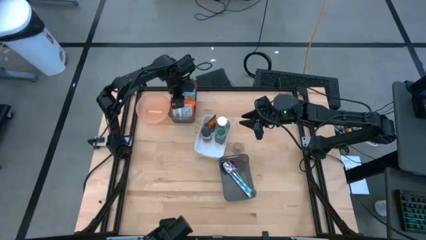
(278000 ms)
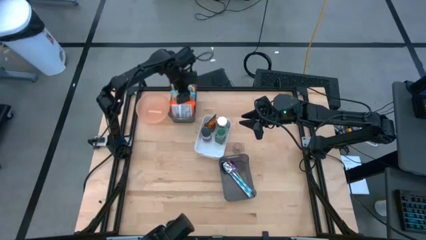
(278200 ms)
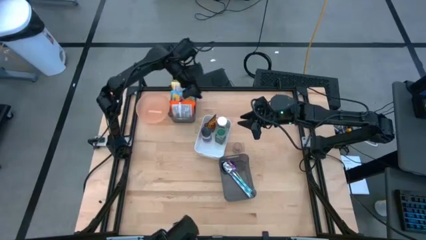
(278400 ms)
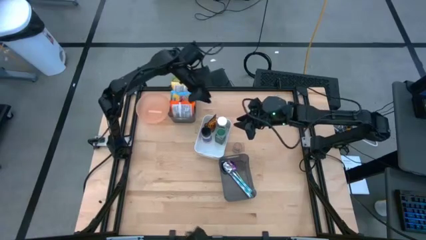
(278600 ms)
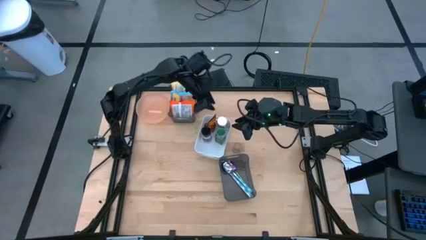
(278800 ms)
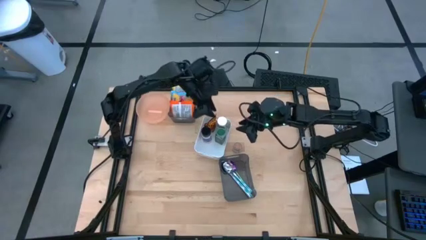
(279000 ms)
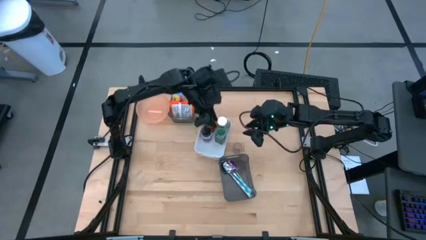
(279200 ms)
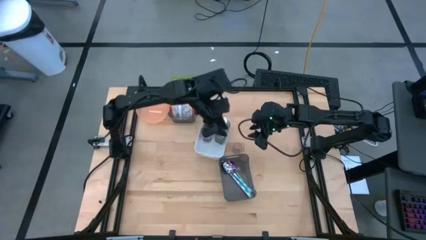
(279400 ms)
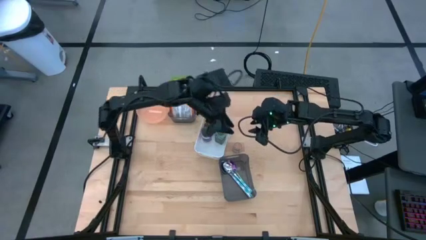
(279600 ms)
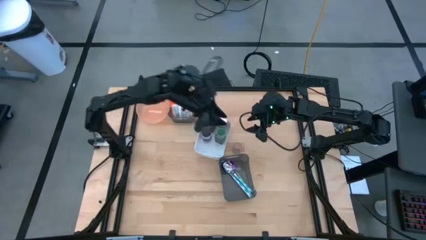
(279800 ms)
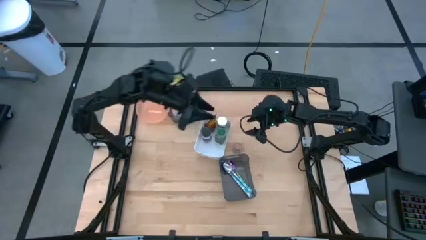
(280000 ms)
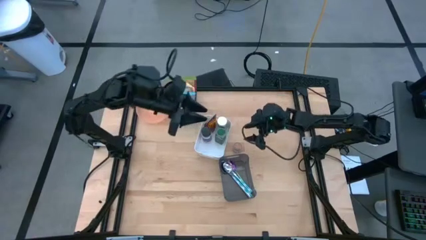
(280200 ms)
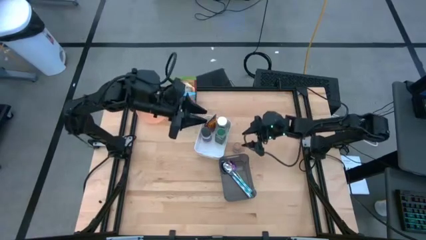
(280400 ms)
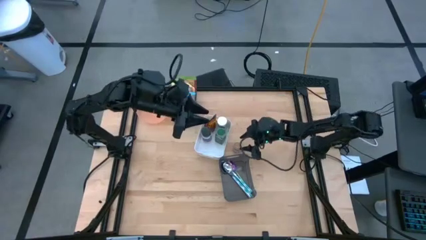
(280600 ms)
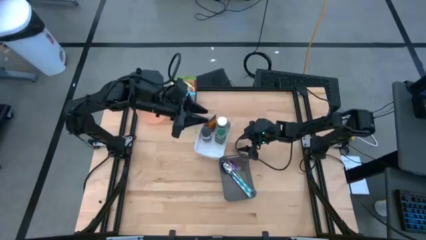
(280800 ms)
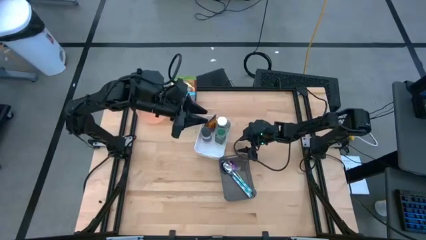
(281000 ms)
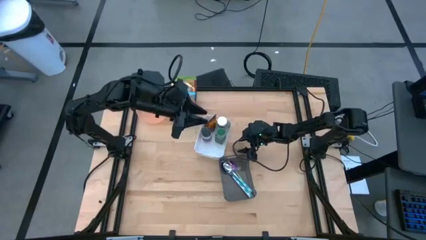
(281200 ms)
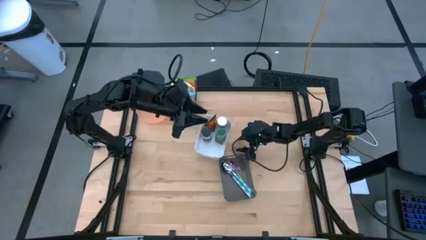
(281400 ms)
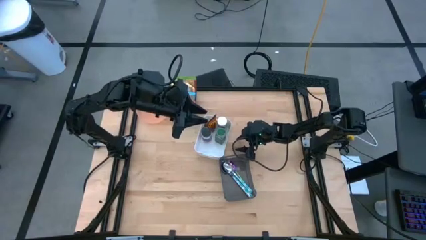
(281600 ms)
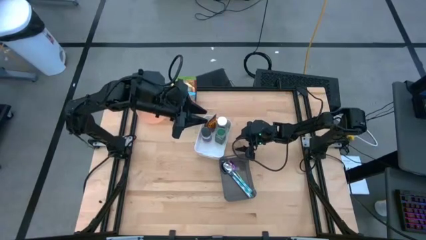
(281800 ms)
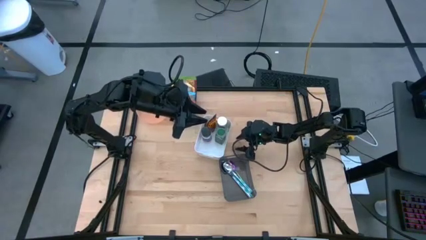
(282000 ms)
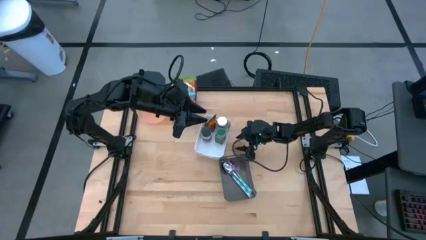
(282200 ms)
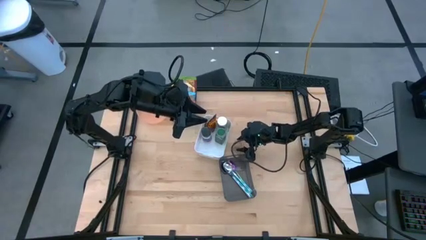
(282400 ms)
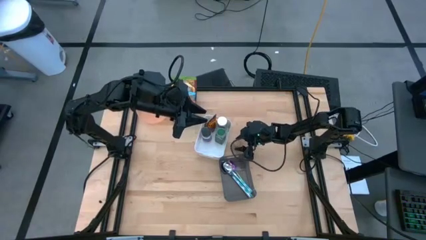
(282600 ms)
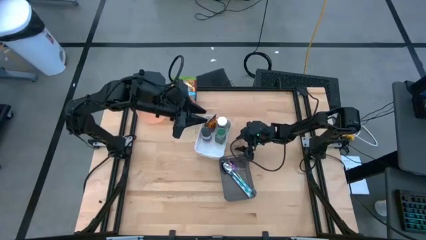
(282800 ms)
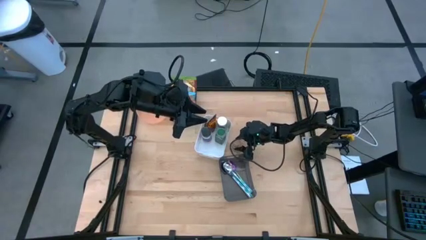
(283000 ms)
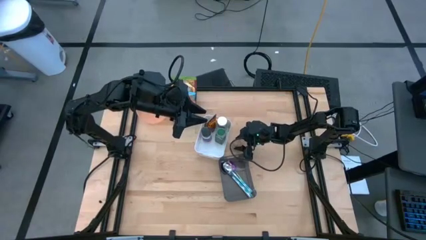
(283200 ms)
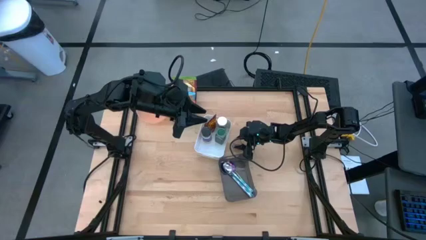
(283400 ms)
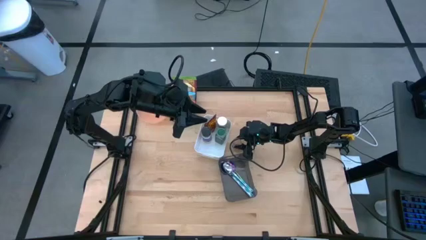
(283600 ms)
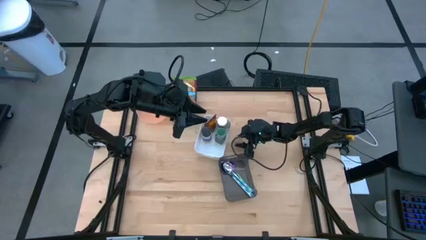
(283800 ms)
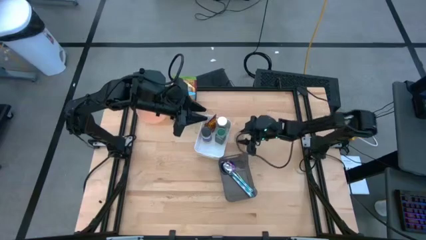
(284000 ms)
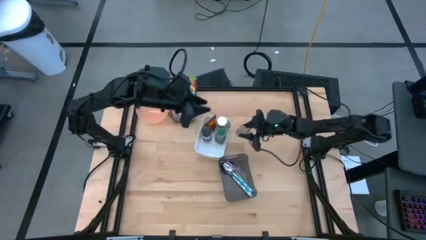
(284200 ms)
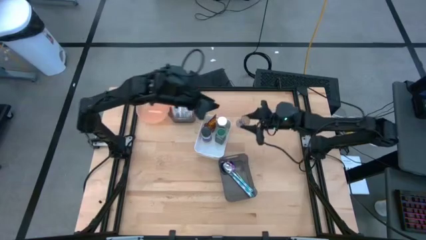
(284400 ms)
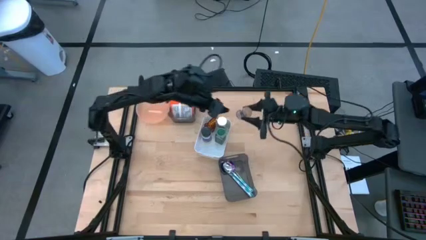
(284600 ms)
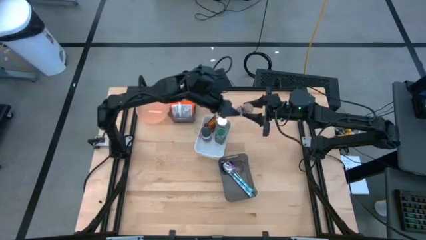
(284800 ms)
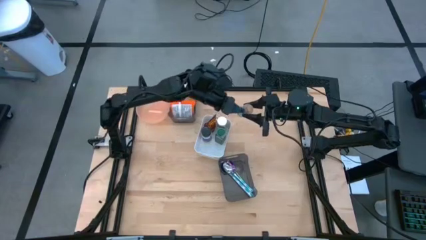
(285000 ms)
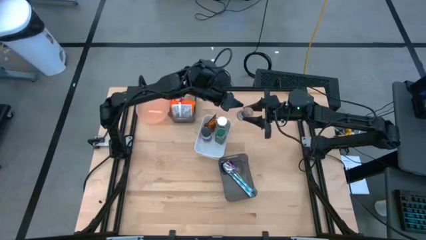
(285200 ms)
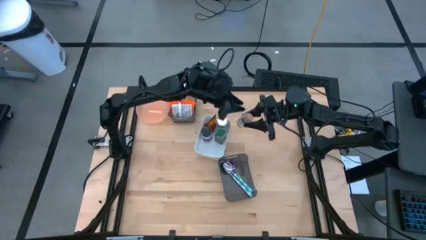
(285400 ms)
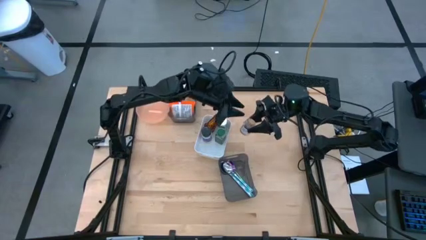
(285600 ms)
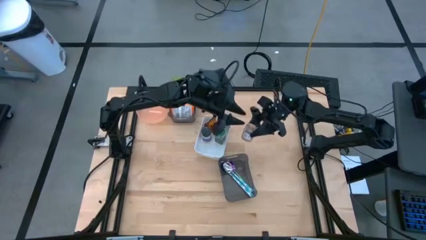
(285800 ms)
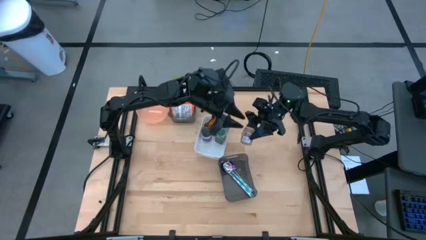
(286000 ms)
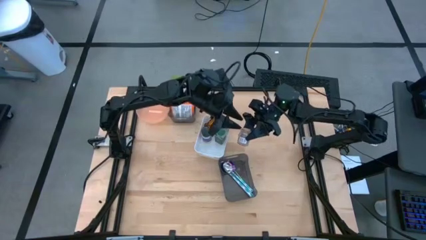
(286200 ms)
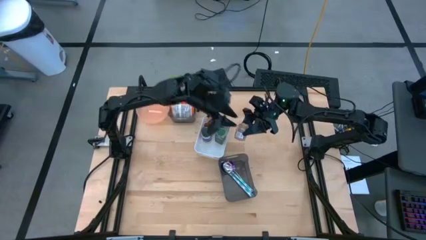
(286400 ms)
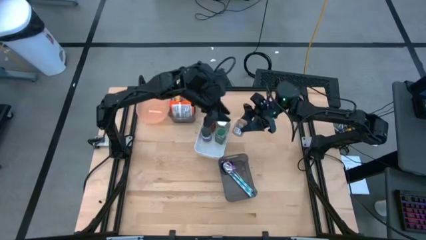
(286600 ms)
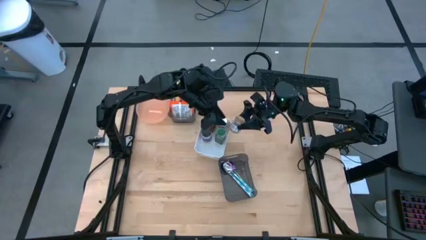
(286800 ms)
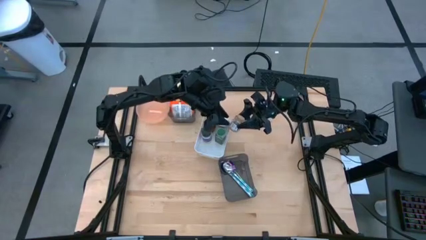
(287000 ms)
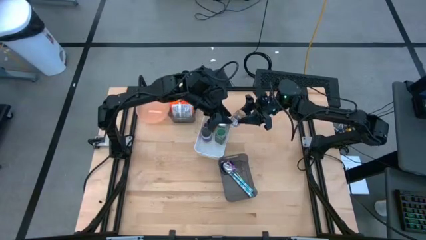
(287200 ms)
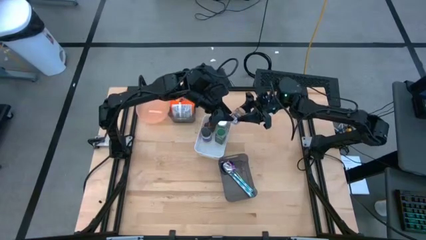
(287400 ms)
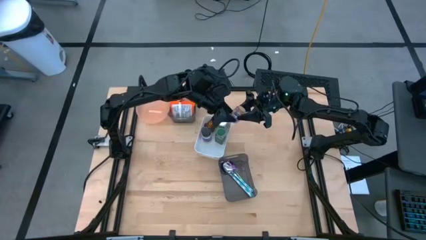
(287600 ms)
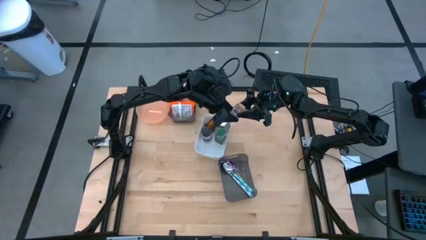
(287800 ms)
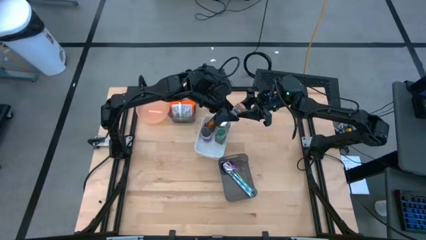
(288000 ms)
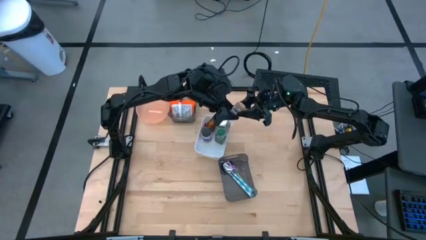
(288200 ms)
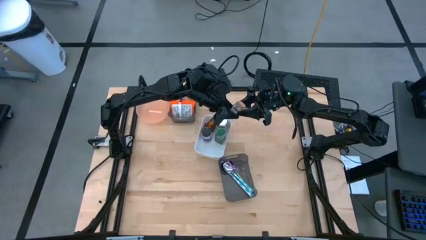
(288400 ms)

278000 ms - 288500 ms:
Task: Pick & Place Food Item
Put the brown seasoning bottle into the white bin

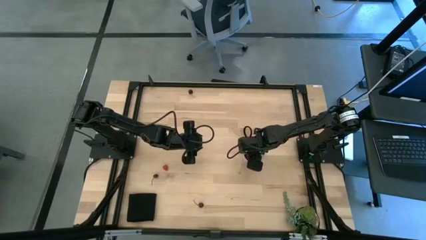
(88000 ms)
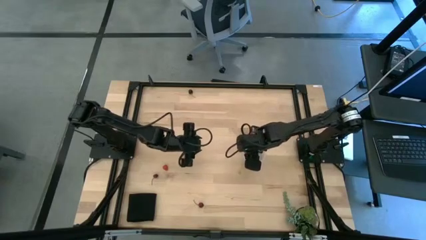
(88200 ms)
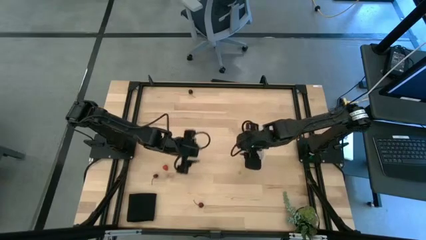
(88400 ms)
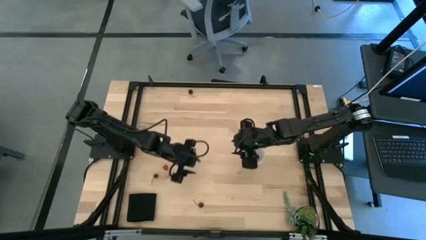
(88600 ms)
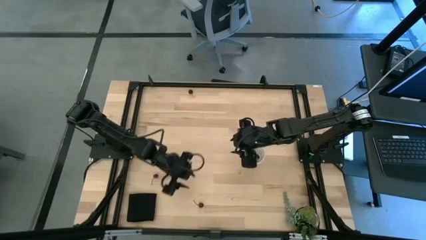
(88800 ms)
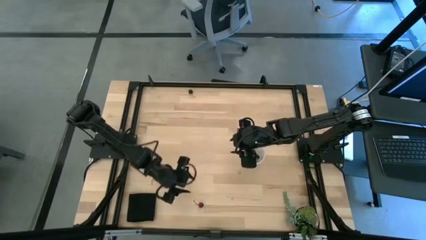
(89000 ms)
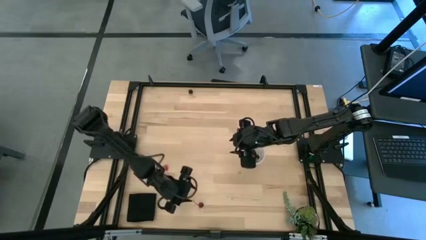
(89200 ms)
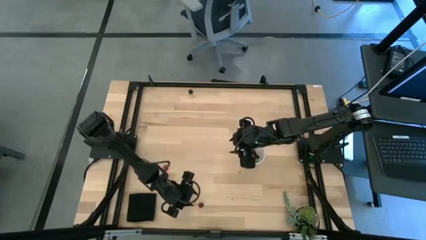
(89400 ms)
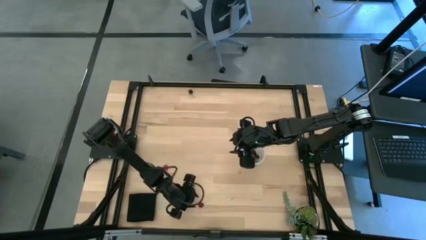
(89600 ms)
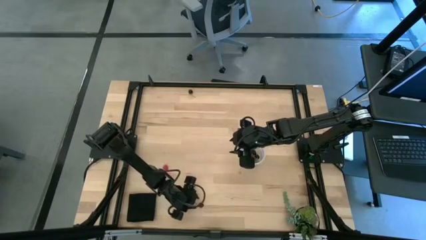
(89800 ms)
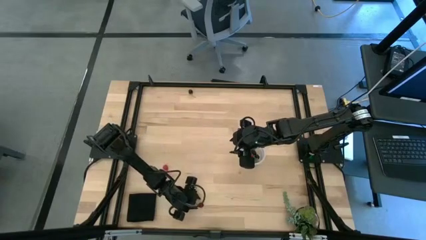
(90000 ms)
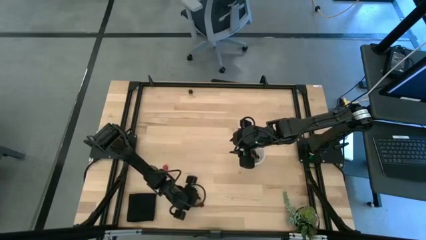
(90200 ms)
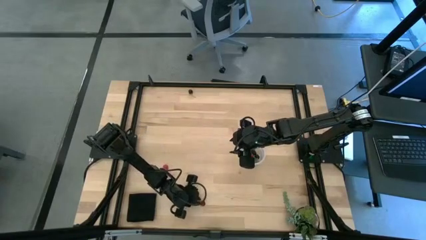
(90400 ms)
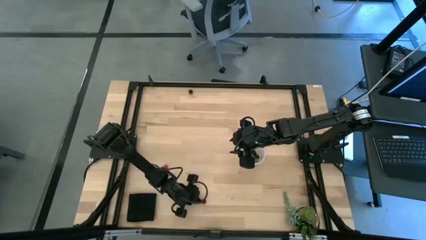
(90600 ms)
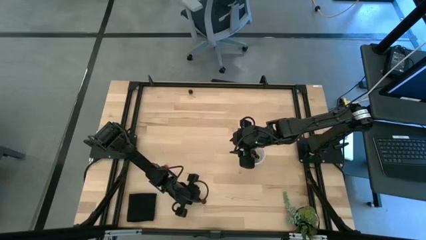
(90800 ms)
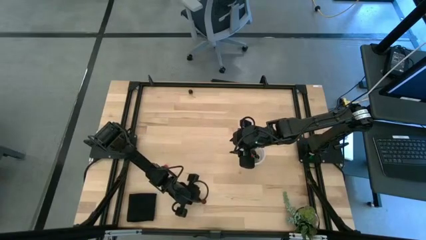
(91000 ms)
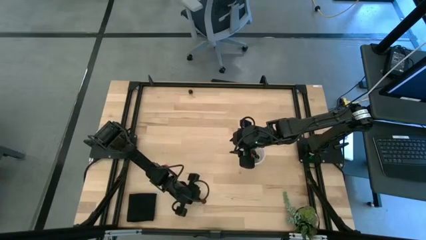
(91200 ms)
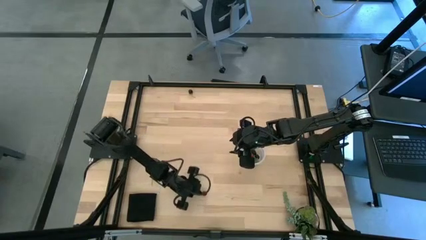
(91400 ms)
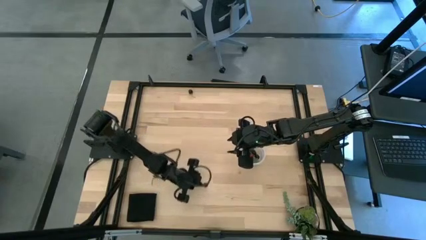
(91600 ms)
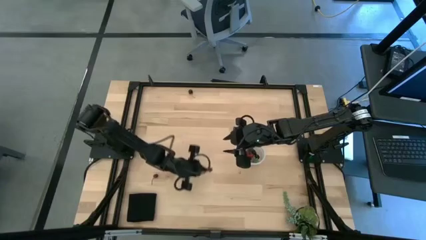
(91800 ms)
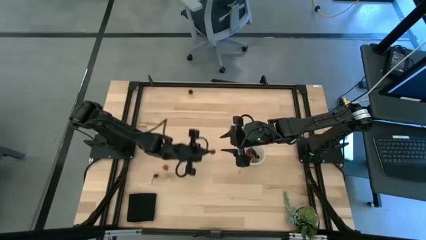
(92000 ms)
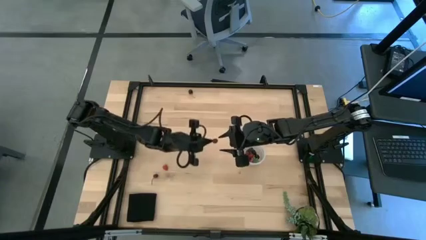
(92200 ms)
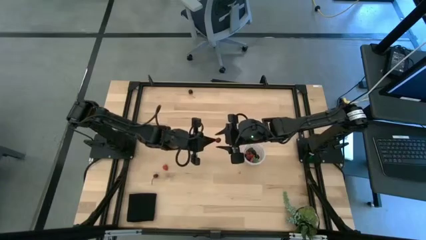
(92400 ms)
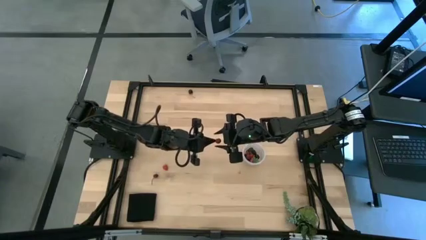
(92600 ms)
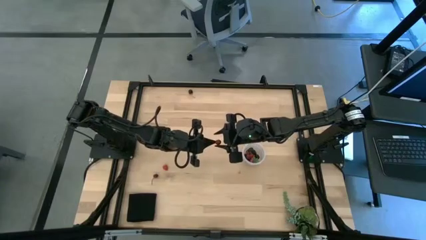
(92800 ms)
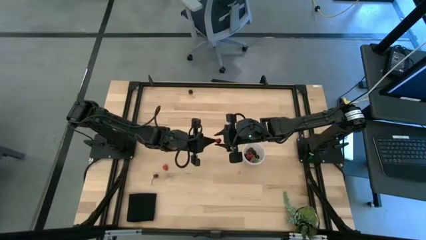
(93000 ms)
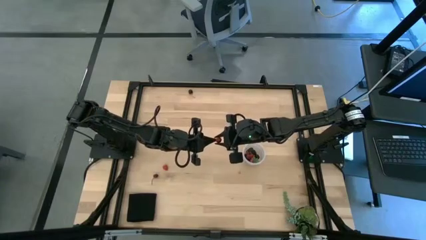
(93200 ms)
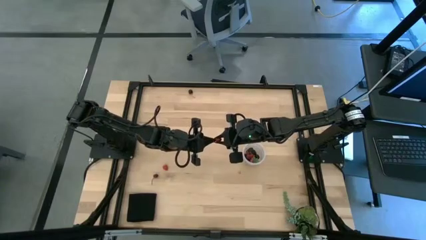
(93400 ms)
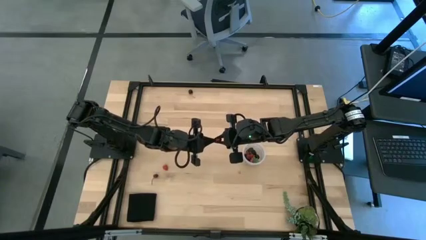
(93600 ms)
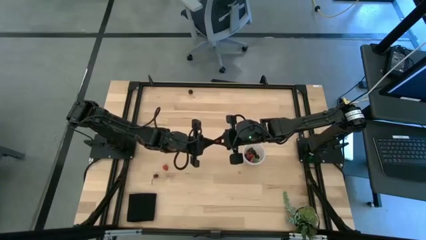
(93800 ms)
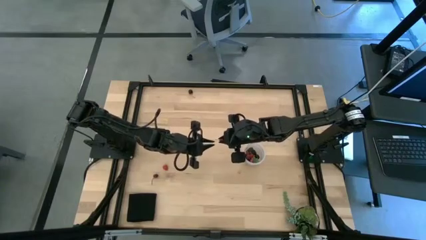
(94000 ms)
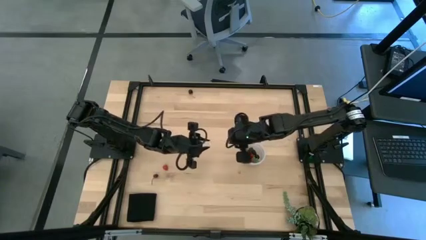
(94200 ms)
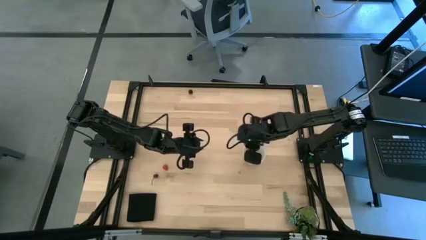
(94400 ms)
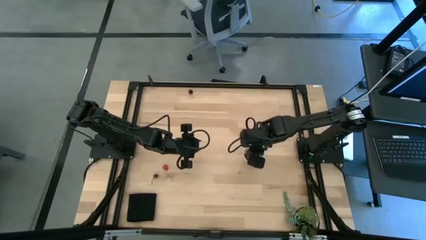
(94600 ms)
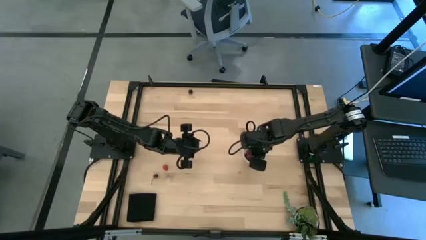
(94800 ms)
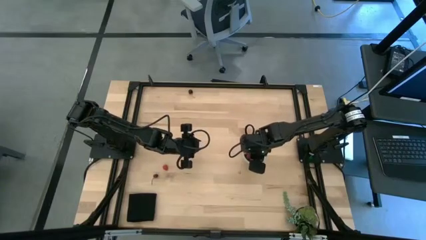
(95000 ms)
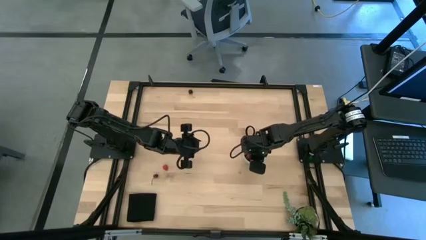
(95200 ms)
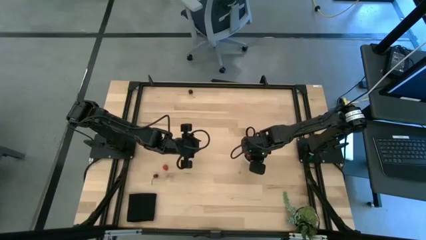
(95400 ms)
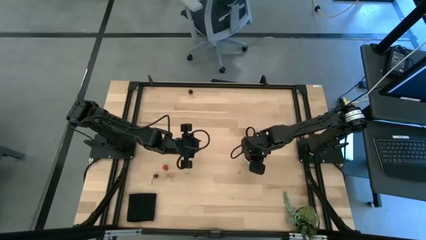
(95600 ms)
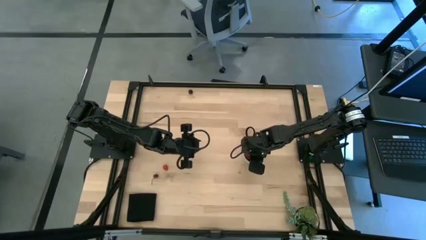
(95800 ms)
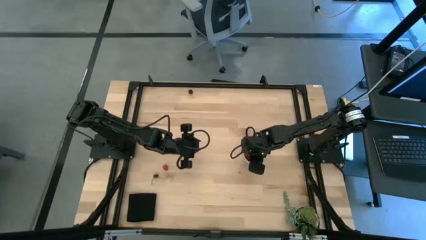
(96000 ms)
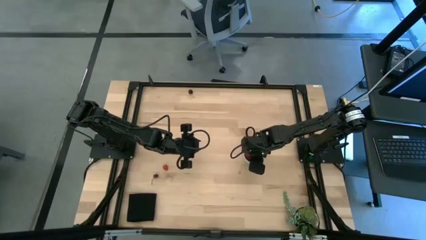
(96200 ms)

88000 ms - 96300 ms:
Task: Pick and placing Produce into tupperware
Put the red cherry into the transparent bucket
